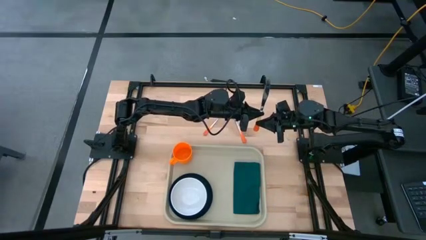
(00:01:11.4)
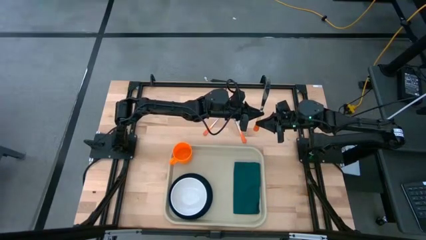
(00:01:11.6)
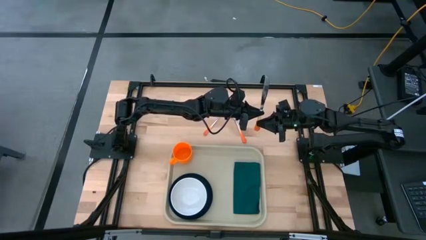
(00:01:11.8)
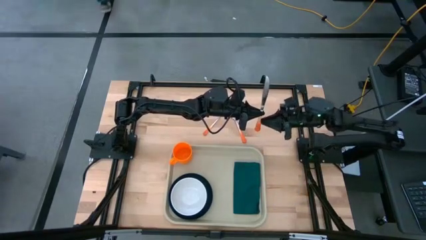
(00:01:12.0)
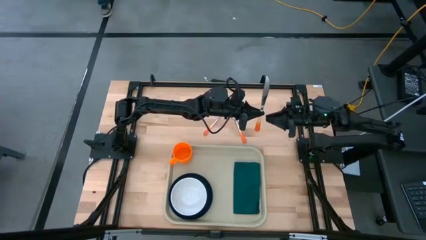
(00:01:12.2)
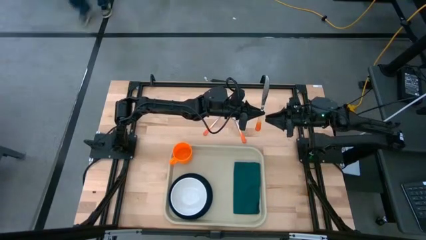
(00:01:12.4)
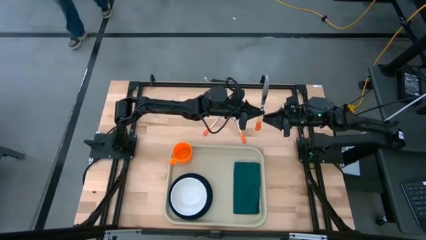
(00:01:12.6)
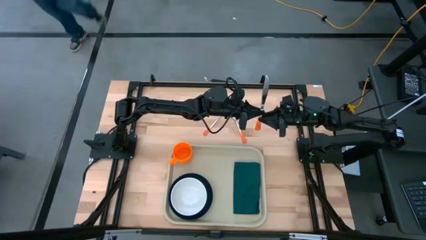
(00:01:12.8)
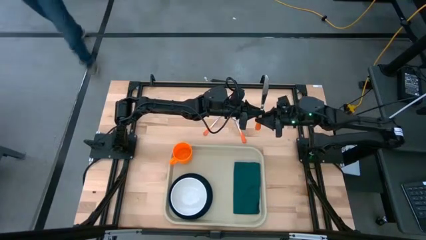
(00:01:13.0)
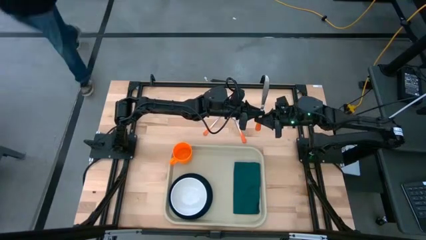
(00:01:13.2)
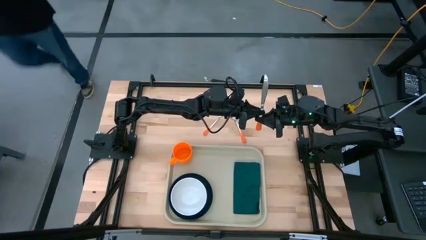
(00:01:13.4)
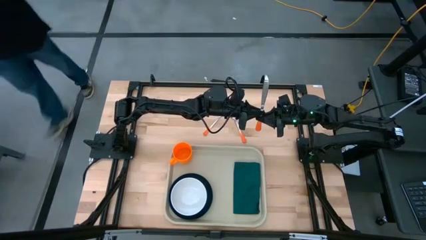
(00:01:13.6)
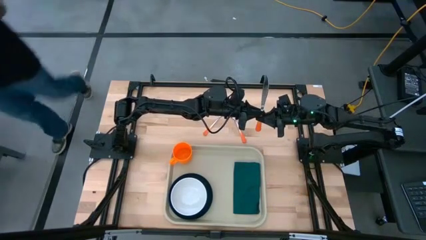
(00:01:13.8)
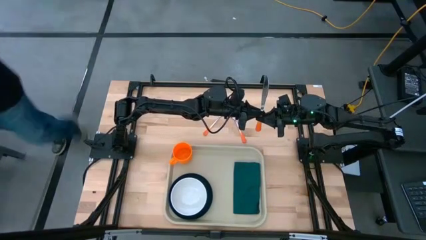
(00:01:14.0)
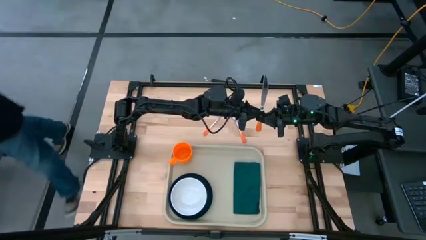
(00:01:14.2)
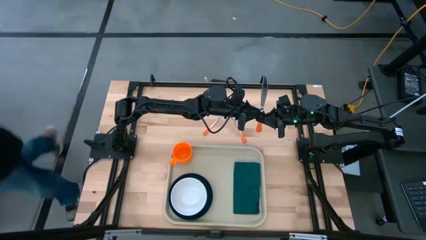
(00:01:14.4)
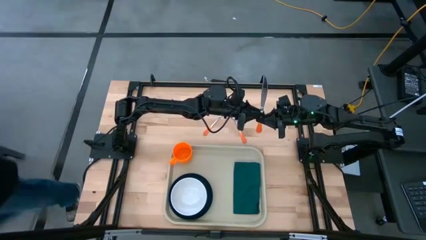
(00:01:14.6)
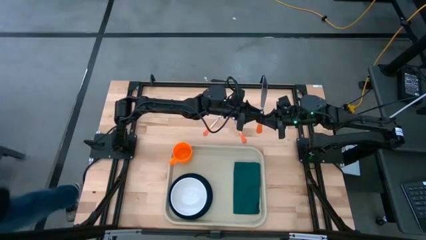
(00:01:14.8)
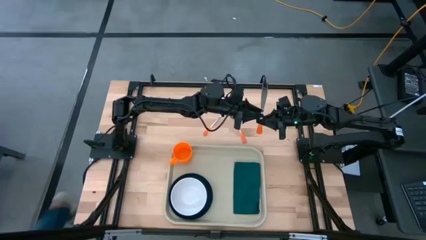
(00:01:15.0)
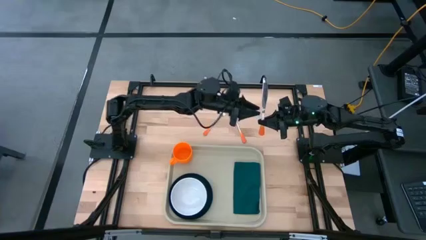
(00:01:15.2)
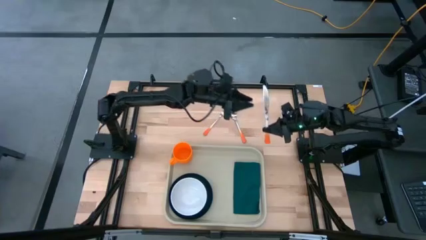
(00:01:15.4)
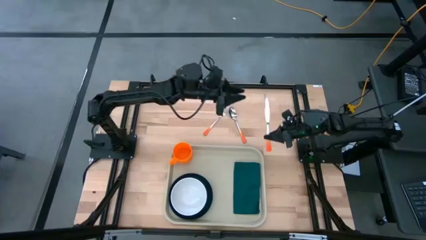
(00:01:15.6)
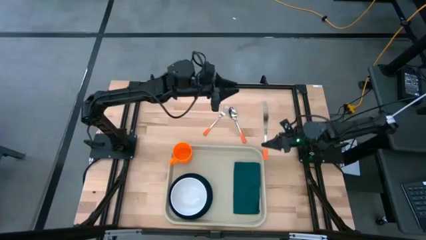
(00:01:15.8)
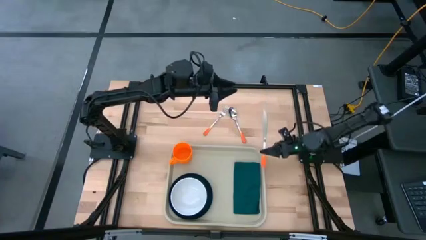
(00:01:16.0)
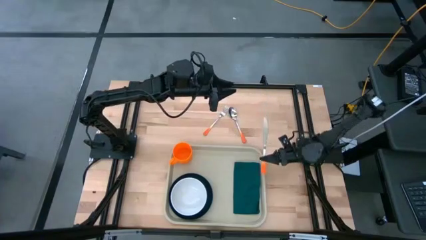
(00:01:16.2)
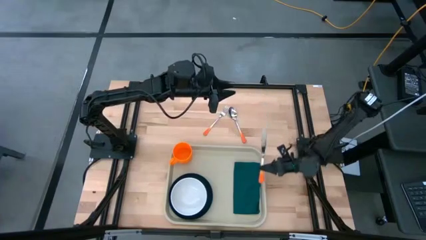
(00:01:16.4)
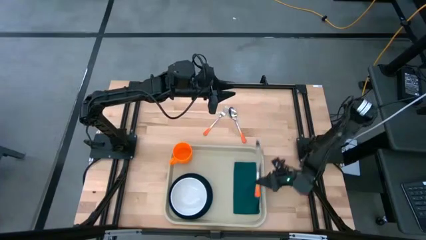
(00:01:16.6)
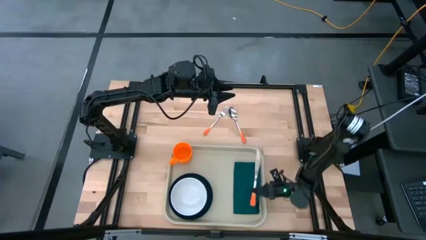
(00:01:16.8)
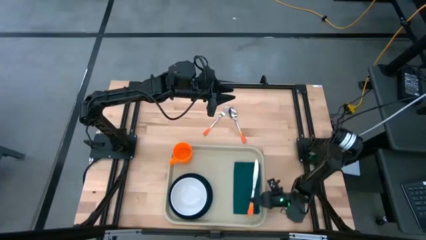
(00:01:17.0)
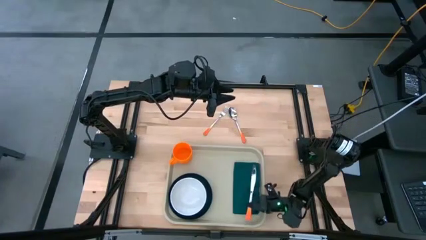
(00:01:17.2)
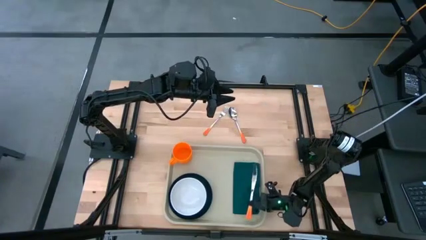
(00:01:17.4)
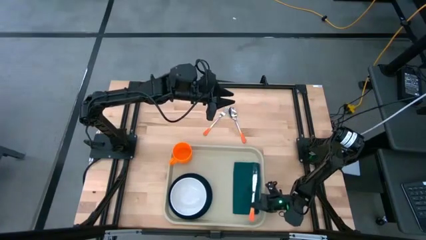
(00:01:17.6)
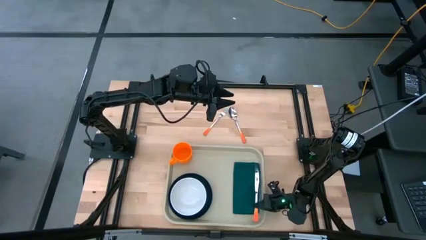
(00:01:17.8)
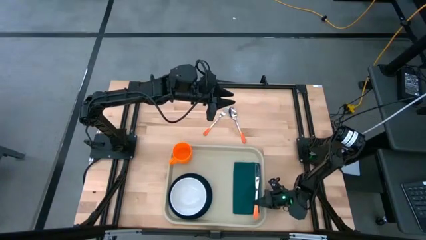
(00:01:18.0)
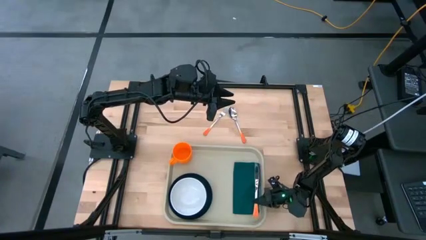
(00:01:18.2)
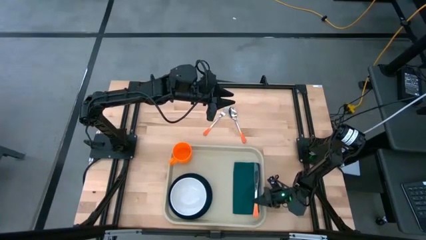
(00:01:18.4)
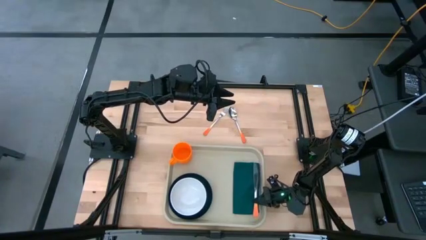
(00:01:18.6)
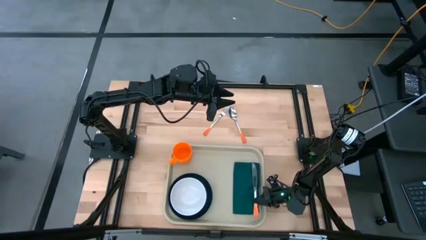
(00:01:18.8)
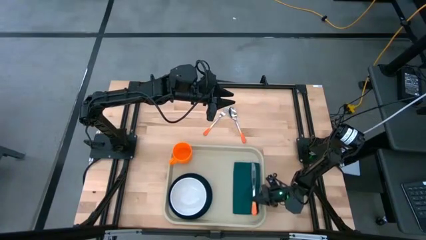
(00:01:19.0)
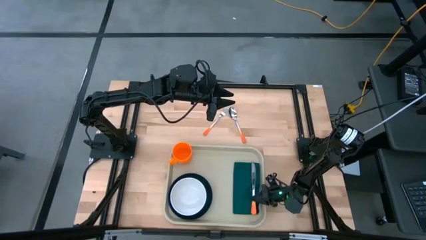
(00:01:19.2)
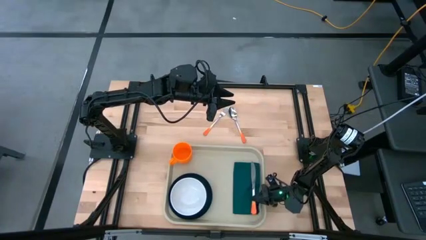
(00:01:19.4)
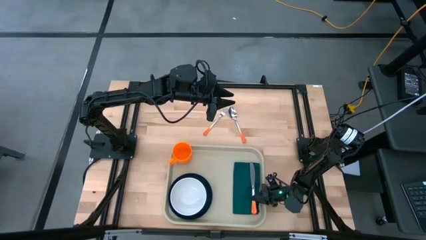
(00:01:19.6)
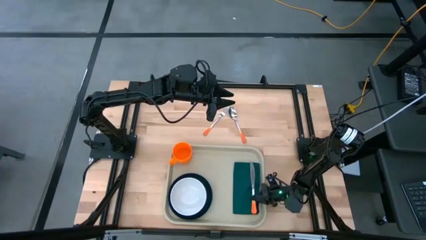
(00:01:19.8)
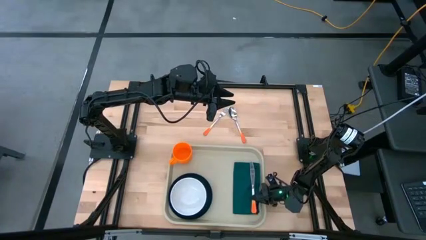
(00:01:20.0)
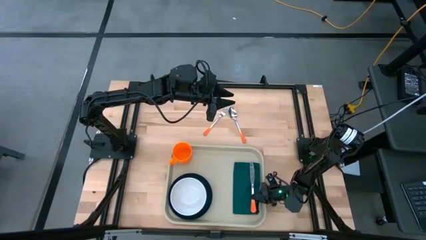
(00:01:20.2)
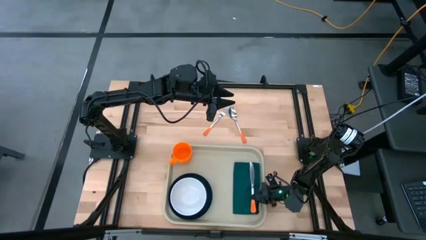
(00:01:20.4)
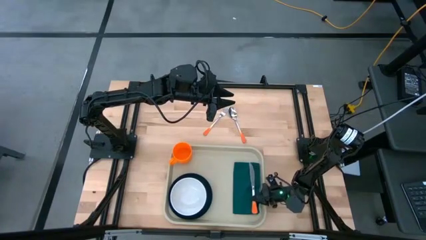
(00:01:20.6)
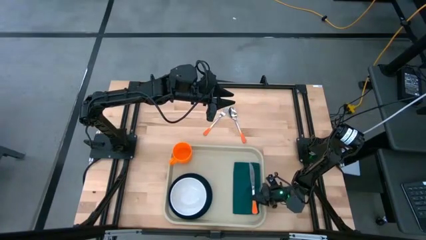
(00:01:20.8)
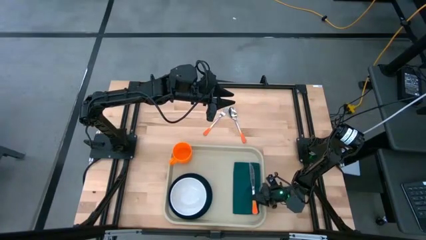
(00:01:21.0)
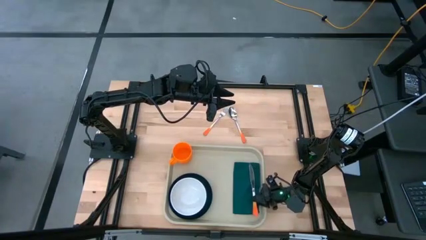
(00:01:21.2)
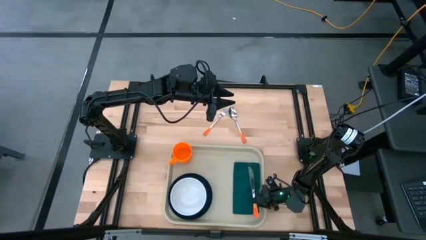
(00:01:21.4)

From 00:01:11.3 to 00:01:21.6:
Task: Set up tray
Put the orange knife on the green napkin
